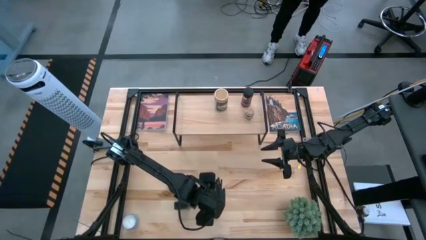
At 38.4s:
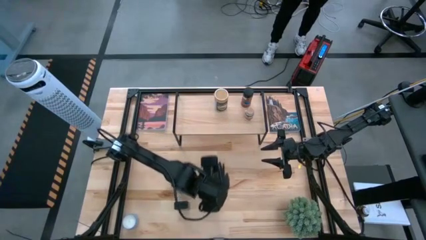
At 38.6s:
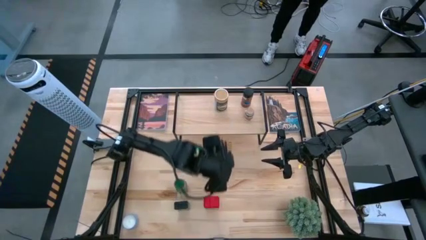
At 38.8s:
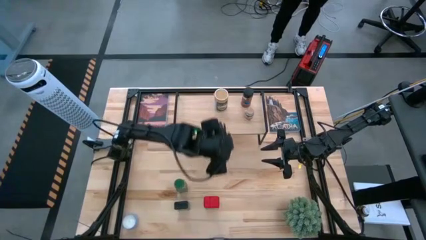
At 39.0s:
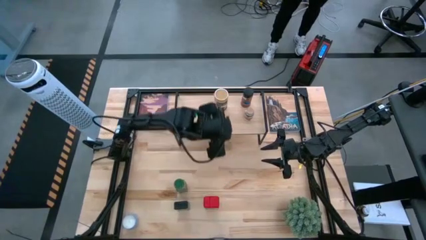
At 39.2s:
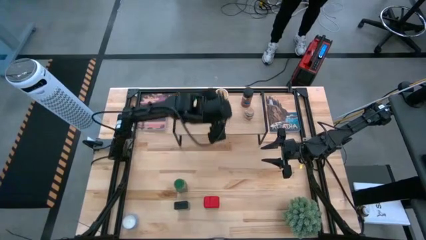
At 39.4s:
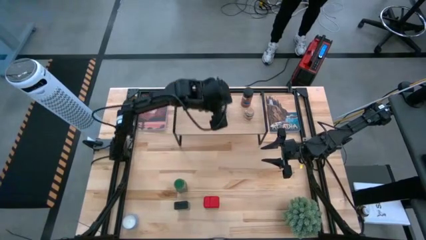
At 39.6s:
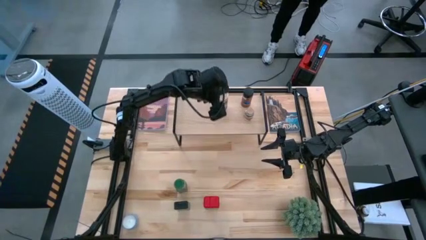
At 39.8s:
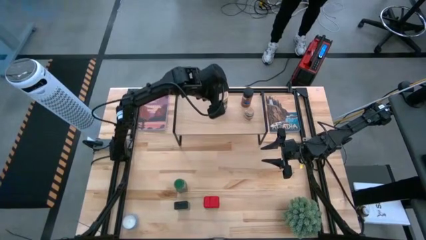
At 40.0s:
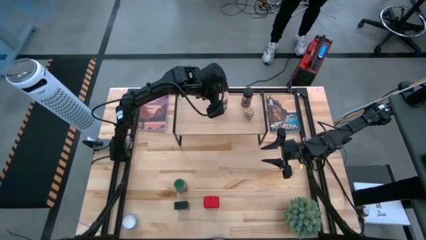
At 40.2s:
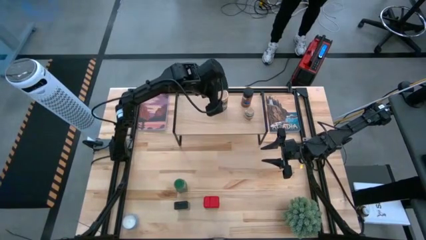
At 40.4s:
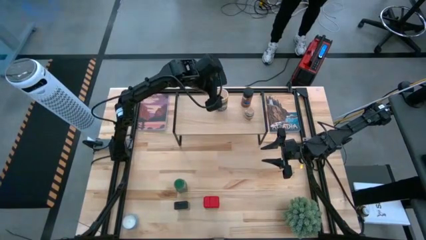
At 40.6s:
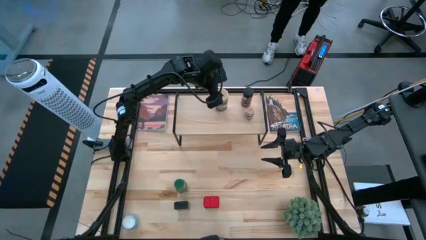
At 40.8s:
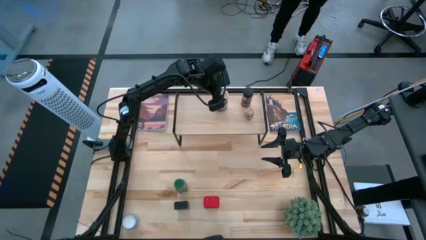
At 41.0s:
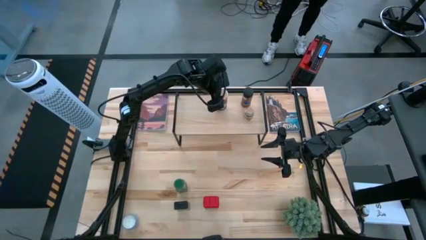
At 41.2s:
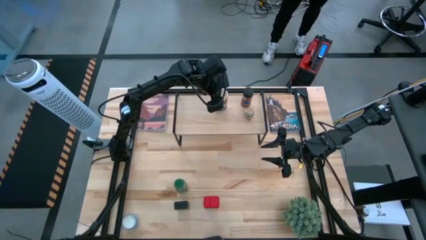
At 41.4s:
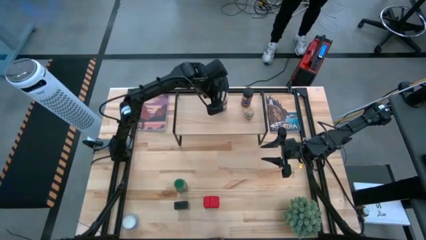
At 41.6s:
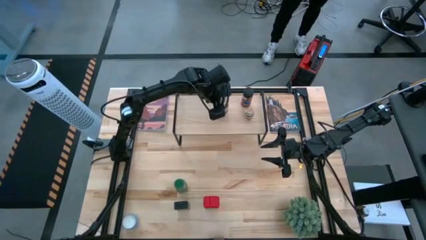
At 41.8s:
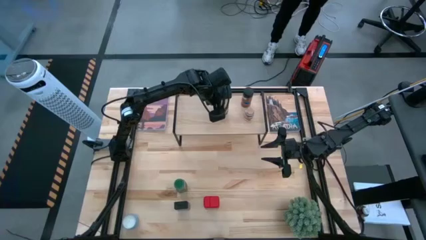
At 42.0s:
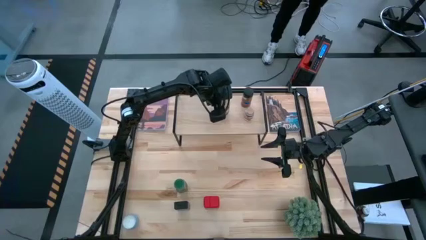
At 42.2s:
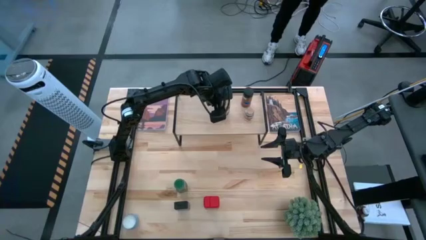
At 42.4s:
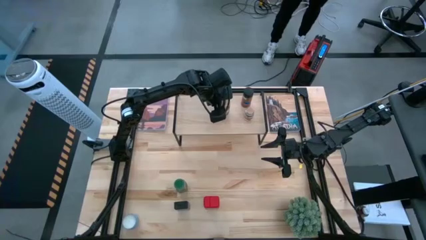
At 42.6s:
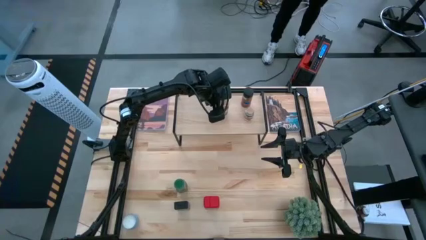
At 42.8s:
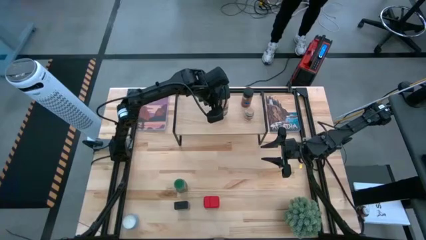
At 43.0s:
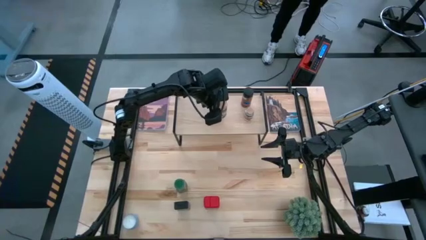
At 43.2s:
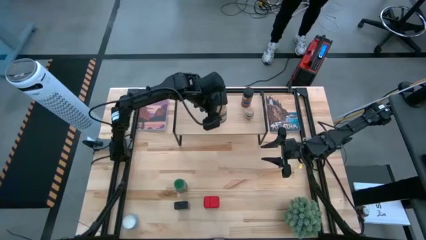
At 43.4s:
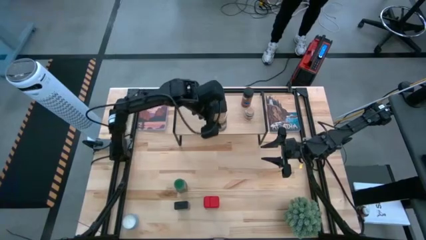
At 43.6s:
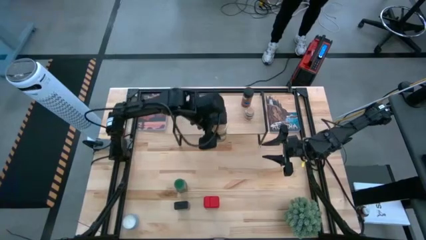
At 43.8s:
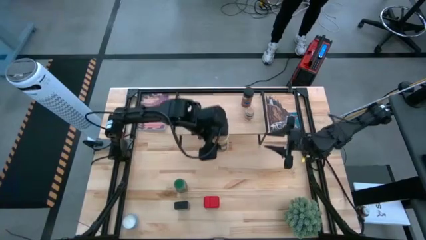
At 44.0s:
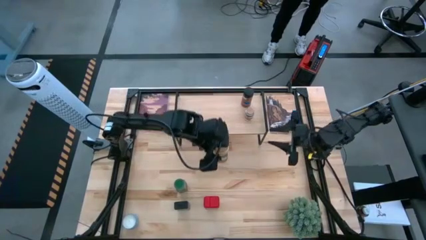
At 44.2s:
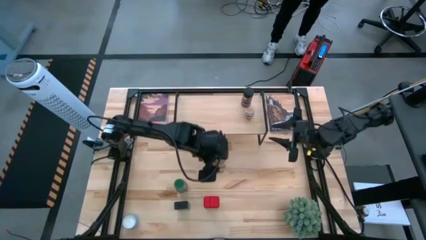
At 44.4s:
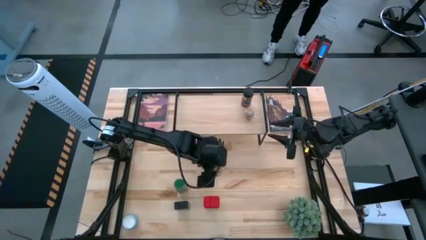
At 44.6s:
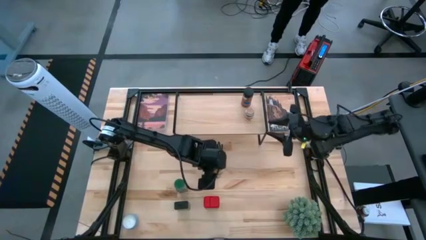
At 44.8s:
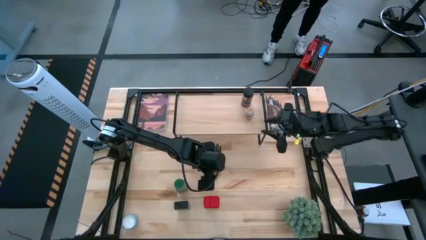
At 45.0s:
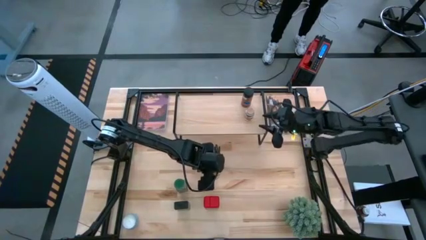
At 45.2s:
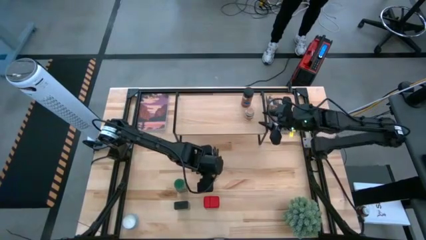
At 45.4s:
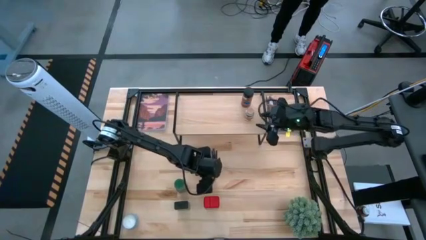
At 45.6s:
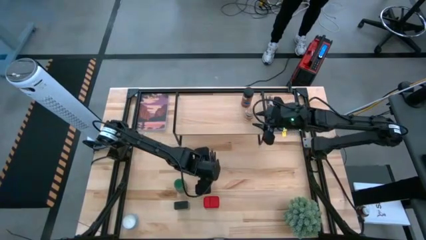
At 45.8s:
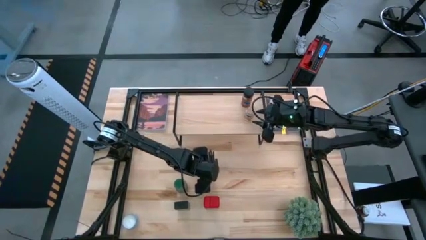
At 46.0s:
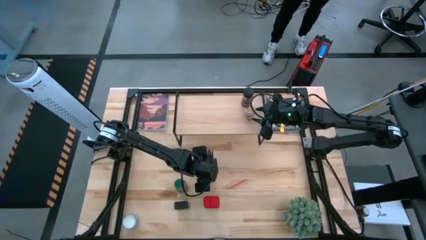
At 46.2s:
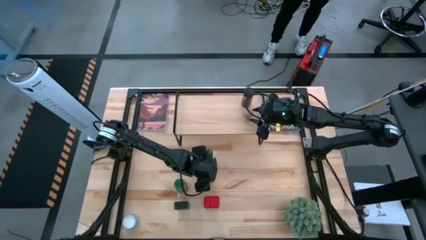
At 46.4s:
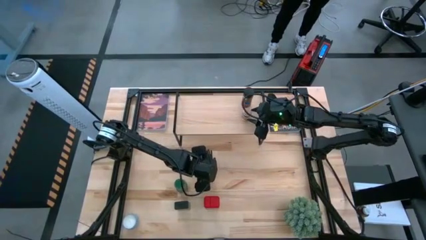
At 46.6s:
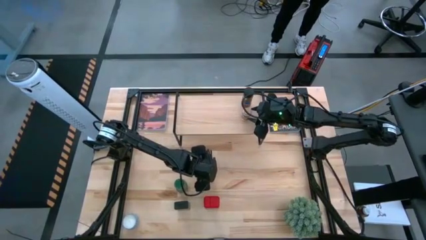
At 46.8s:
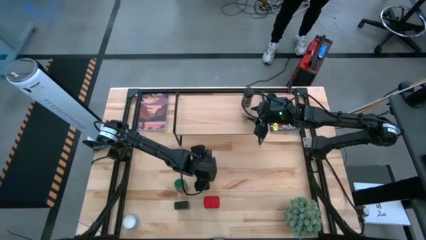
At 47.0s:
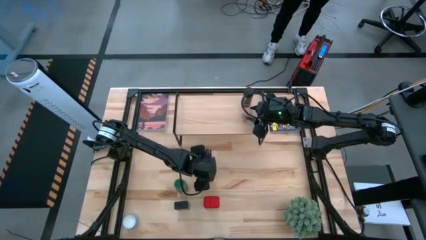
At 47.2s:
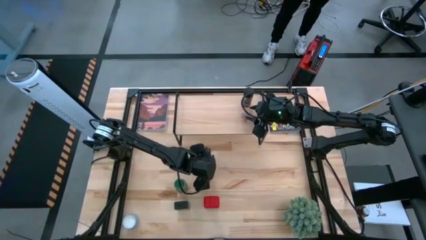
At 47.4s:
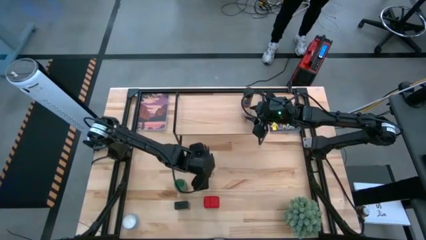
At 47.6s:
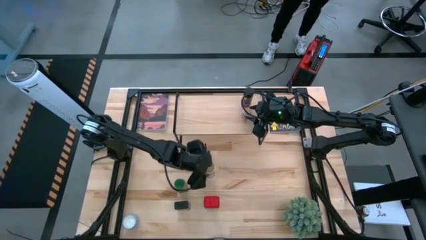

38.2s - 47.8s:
Task: Shelf spices
Remove the yellow seasoning bottle from the shelf

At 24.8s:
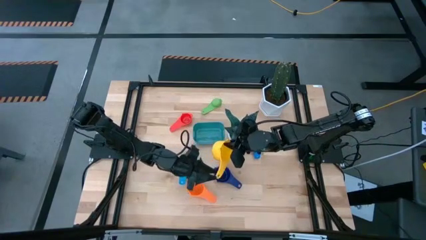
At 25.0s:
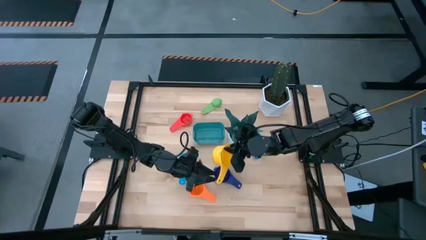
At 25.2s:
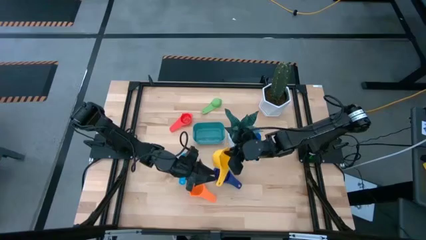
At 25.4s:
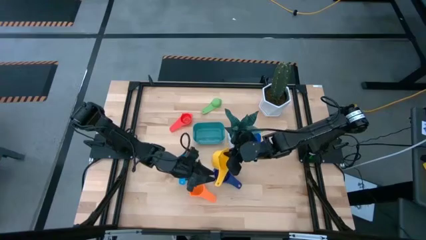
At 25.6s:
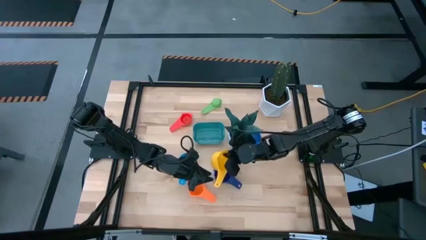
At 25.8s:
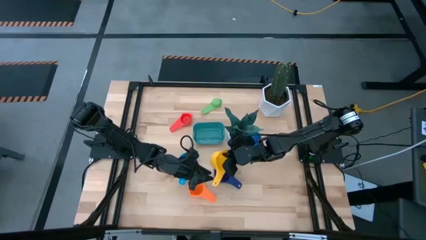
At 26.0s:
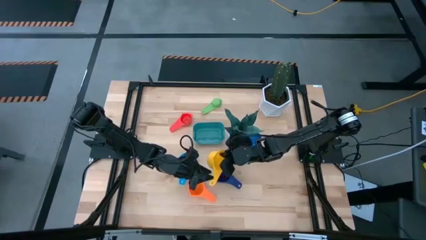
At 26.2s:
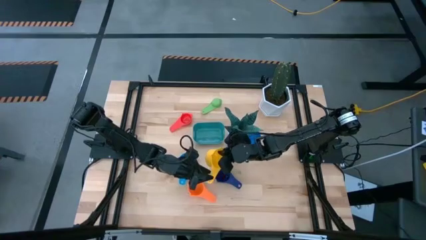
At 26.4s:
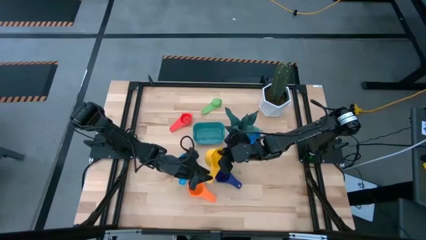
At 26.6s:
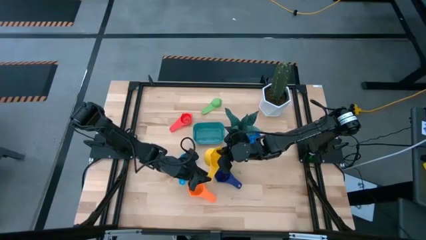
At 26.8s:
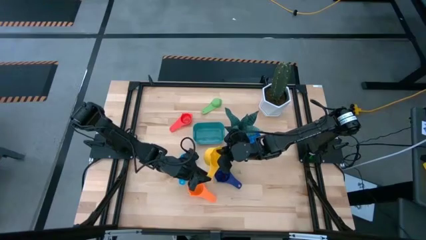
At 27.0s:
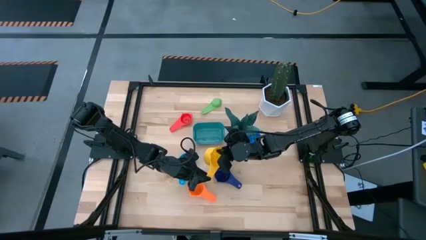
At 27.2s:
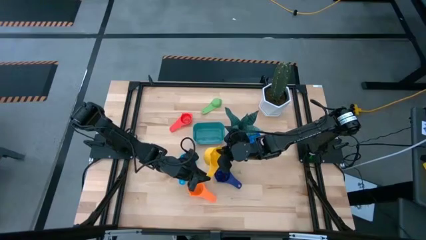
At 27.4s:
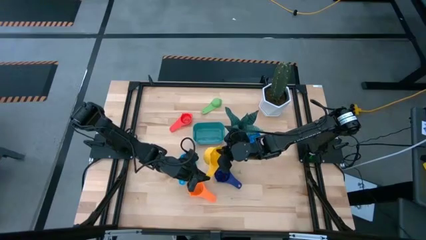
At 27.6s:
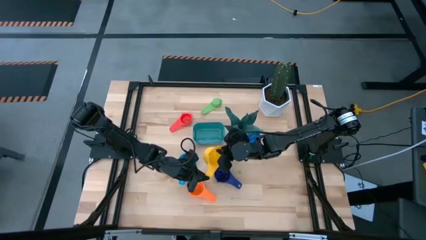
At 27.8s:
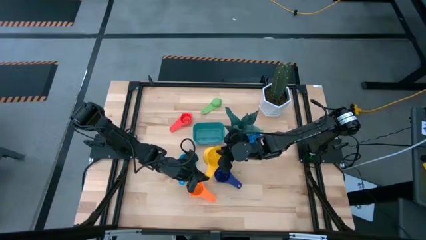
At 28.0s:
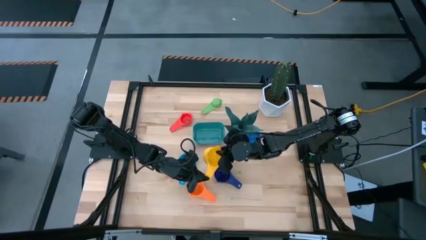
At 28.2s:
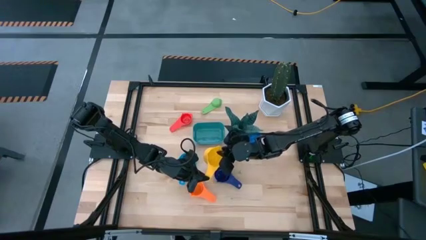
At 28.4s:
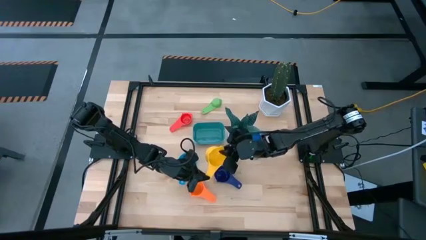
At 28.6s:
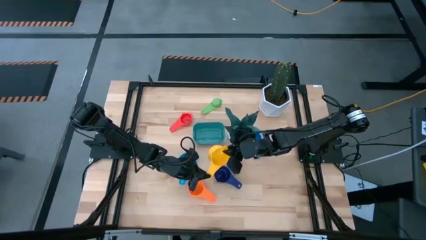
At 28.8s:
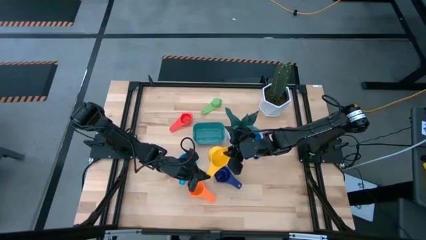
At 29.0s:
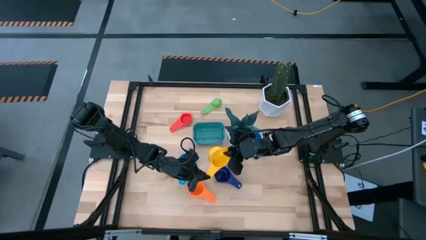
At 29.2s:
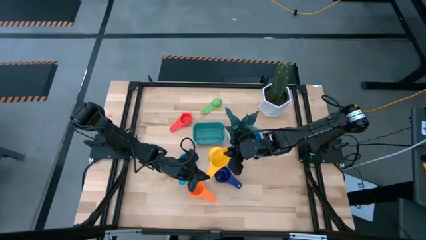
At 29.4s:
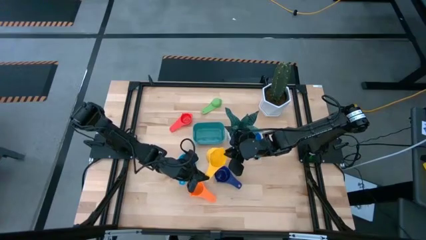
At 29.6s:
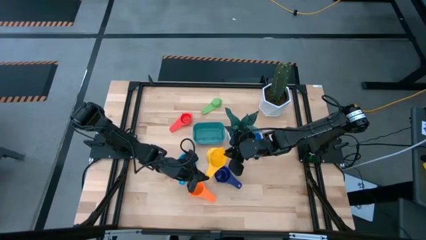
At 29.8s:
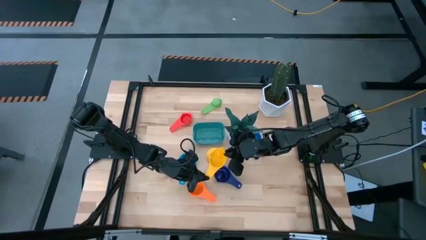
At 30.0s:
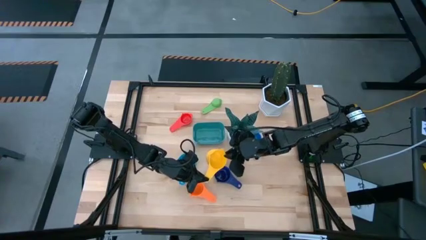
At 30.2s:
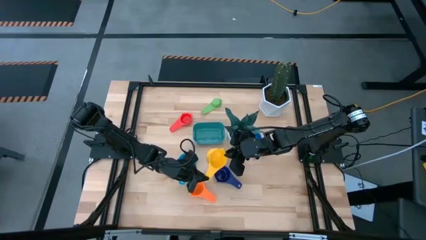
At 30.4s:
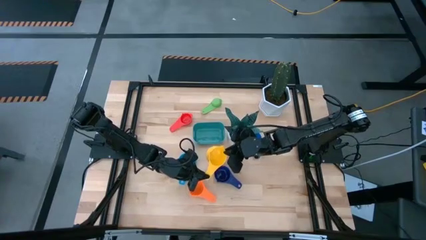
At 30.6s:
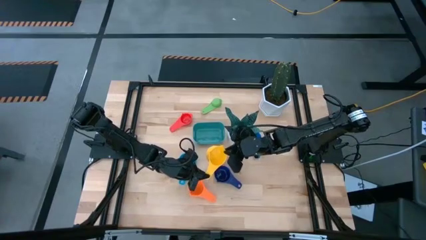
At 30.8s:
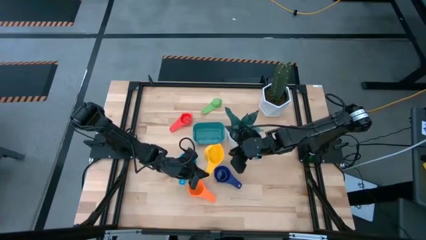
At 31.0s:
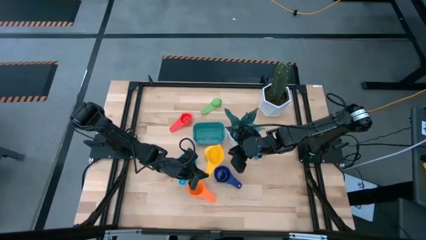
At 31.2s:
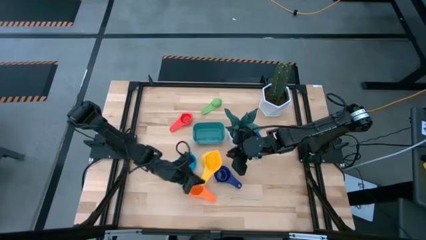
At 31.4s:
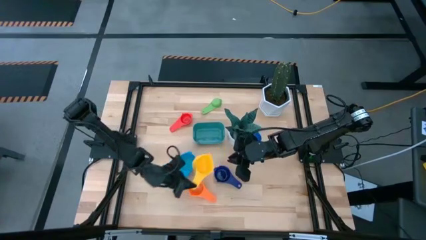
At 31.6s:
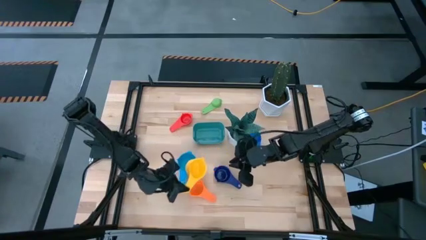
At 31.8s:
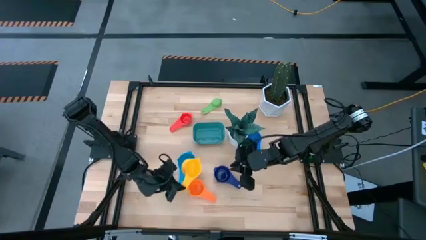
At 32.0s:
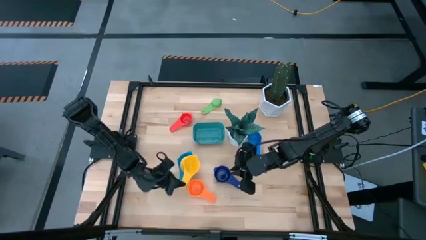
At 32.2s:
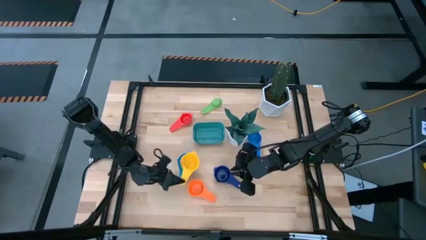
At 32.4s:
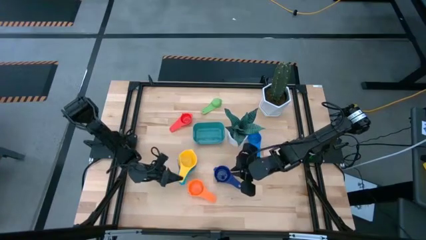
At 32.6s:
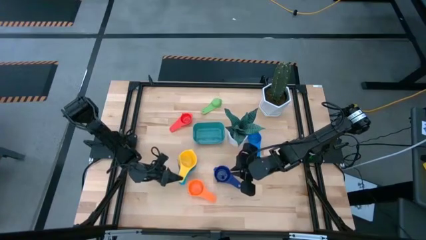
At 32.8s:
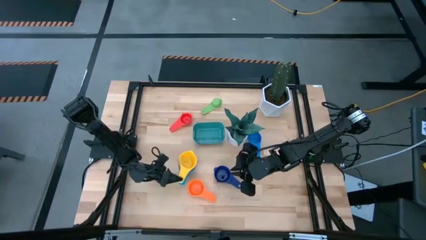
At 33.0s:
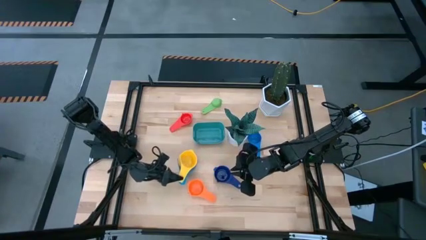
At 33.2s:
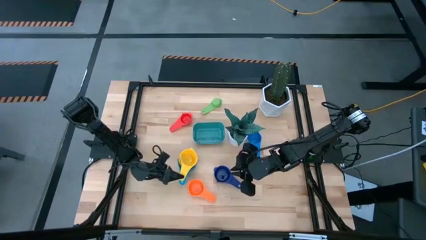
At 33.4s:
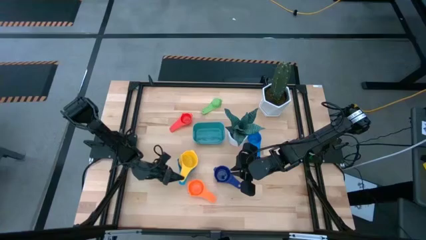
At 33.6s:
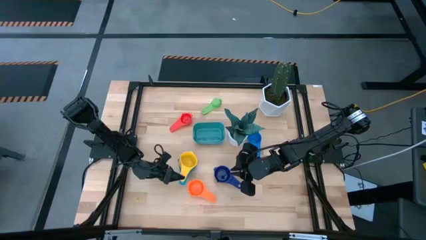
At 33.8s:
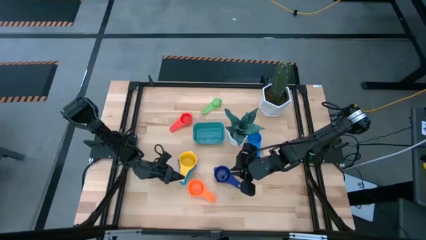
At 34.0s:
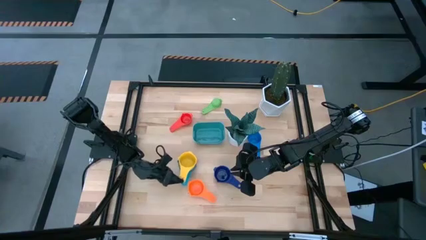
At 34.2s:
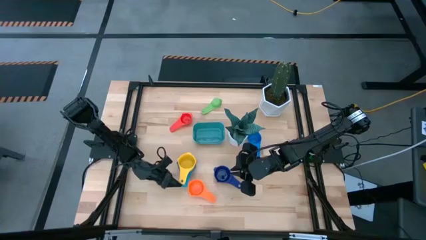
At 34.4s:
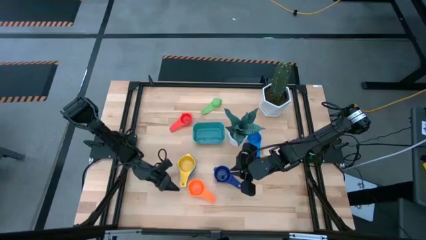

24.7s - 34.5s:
Task: Nest measuring cups in basket
Stack the yellow measuring cup on top of the light blue measuring cup
